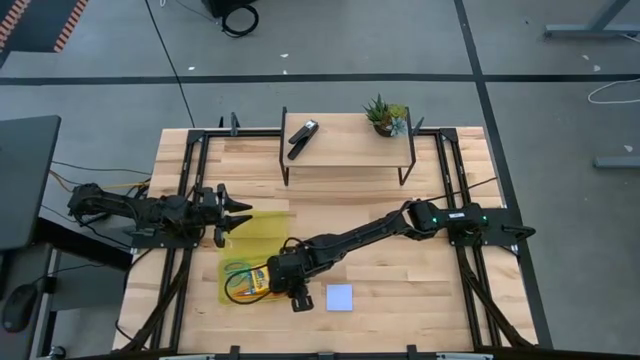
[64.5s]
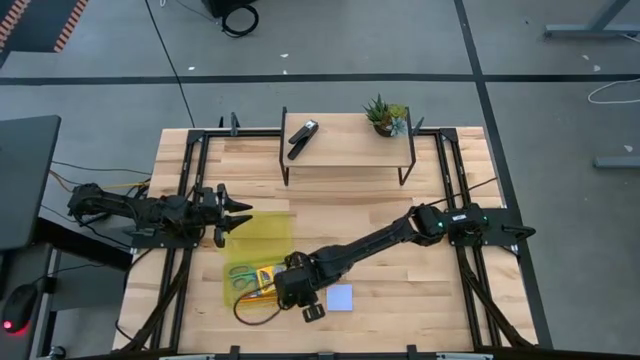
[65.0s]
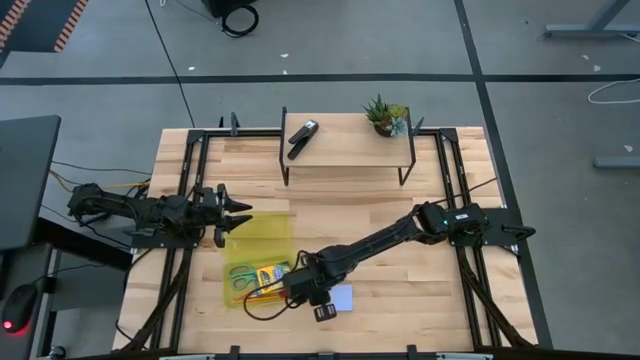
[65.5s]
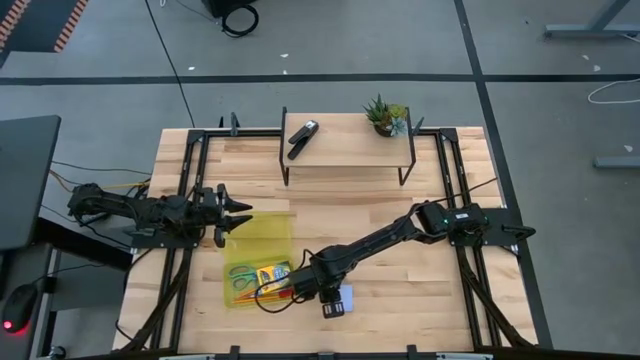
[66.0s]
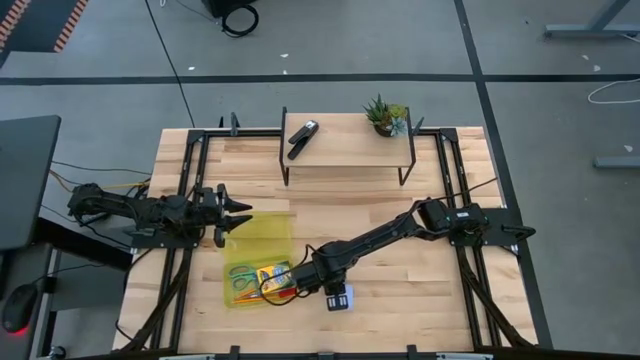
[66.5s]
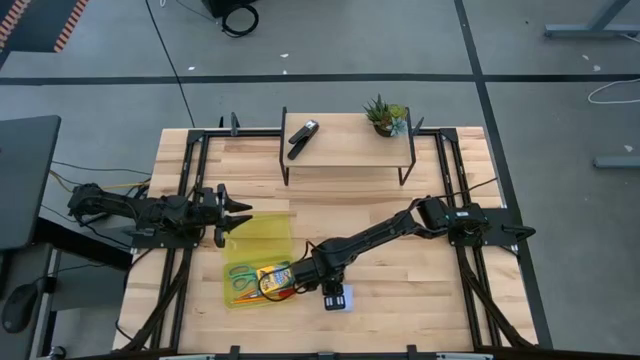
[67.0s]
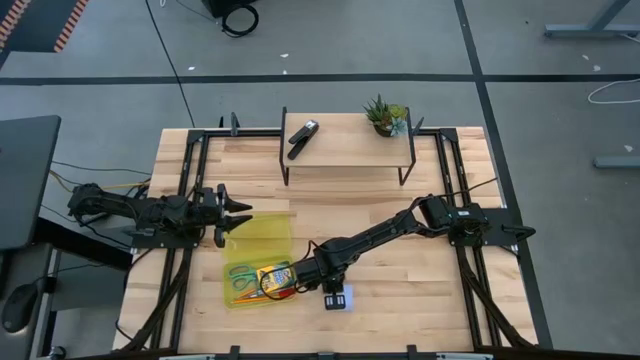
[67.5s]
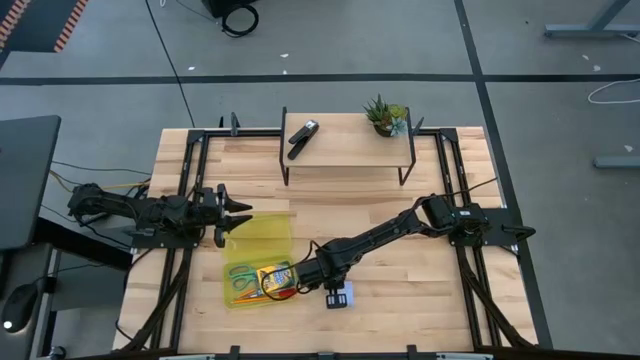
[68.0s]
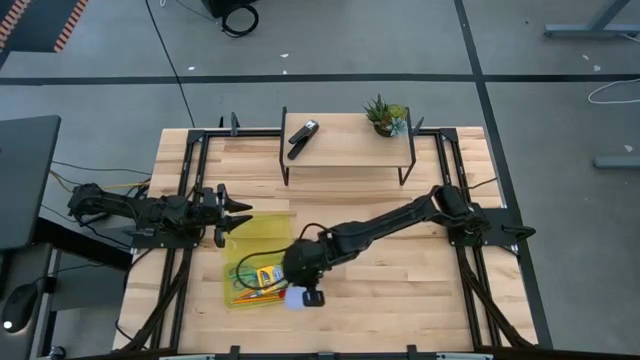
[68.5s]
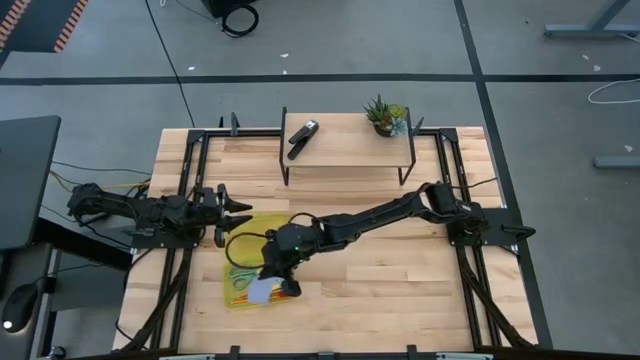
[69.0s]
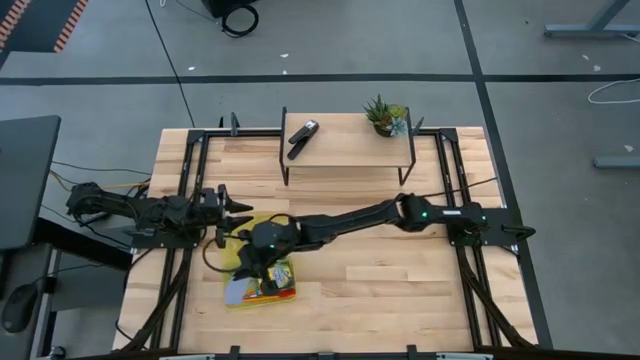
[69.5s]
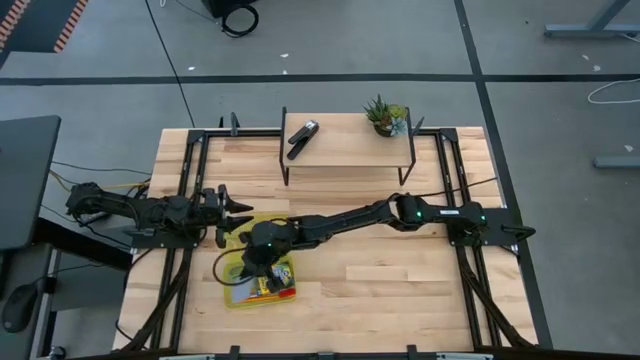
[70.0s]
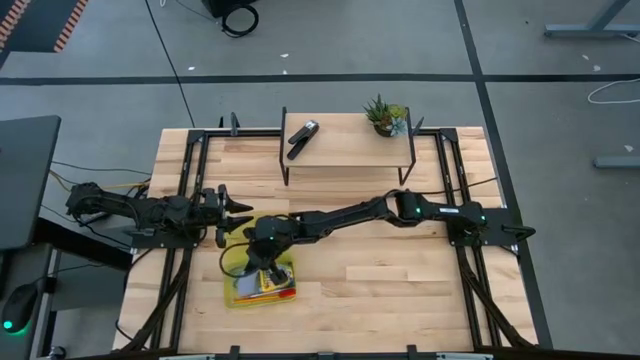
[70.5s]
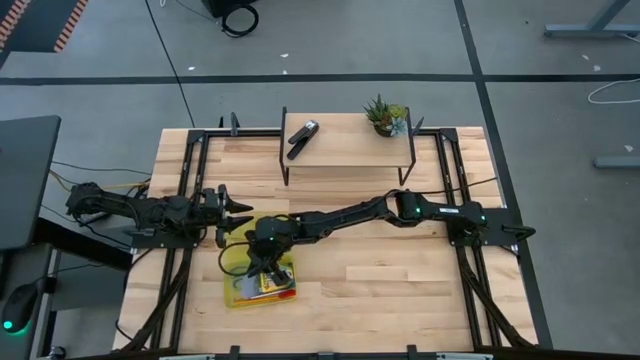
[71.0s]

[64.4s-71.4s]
Task: Pack school essentials
Put the white sticky note into the yellow supply box

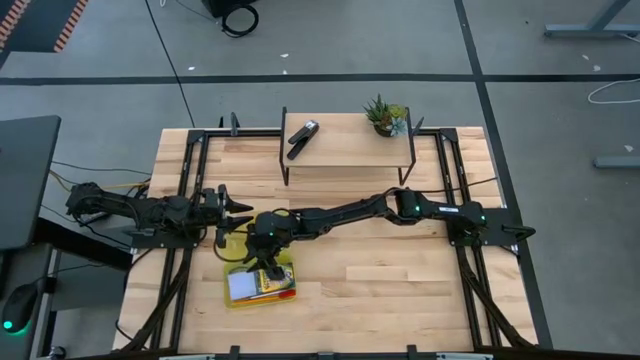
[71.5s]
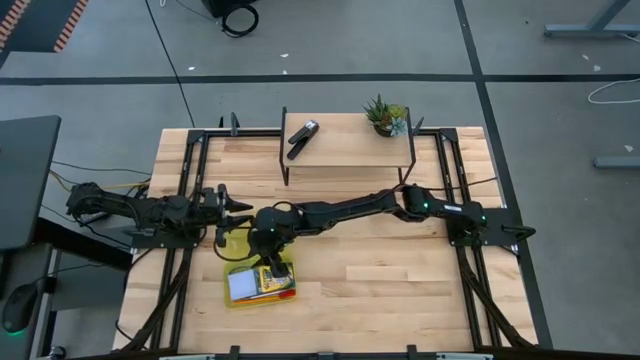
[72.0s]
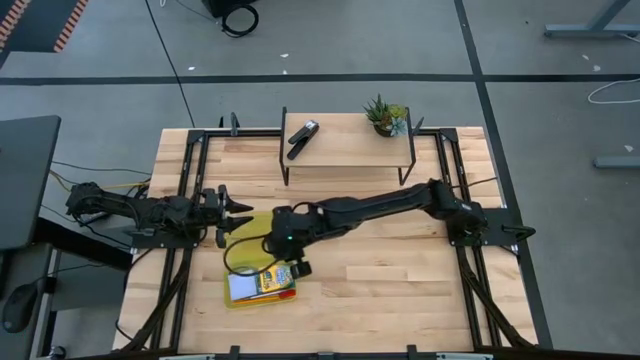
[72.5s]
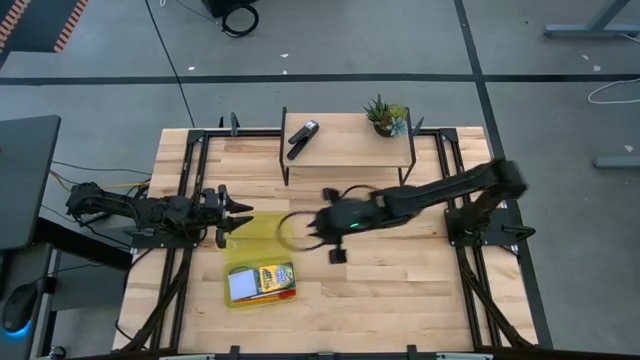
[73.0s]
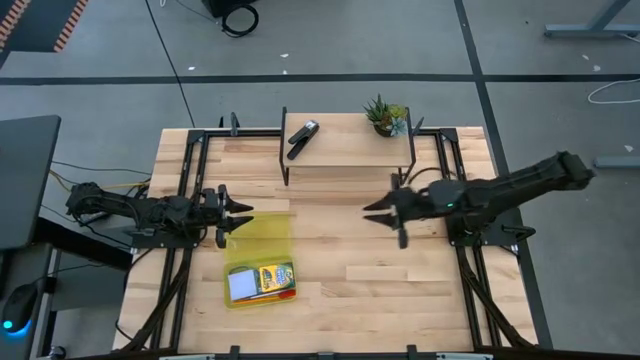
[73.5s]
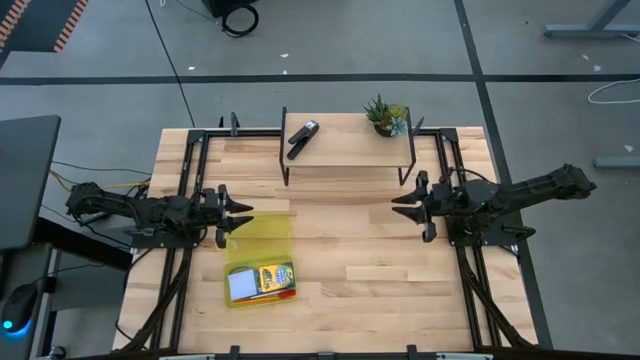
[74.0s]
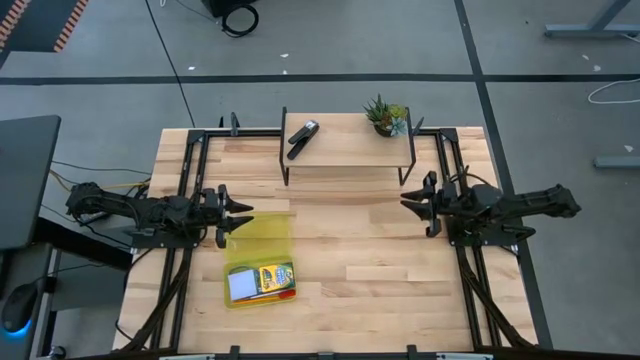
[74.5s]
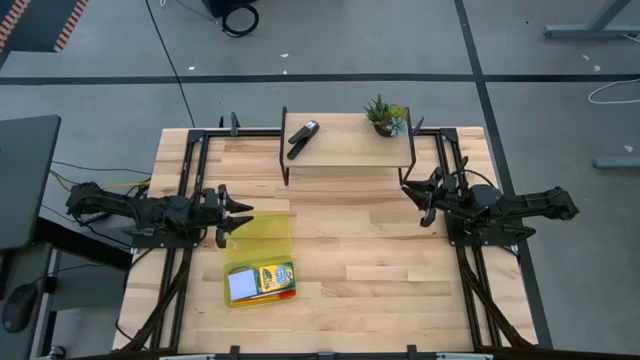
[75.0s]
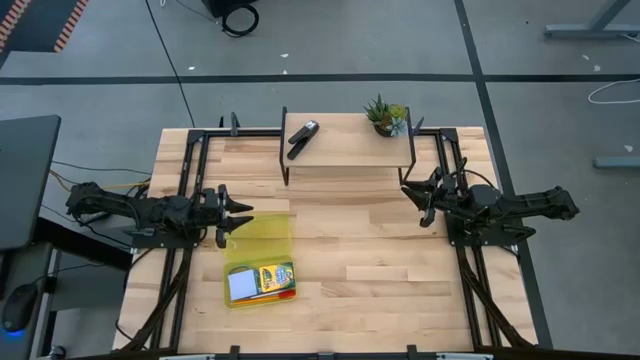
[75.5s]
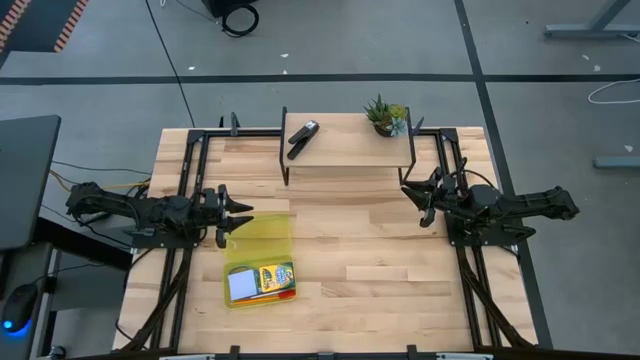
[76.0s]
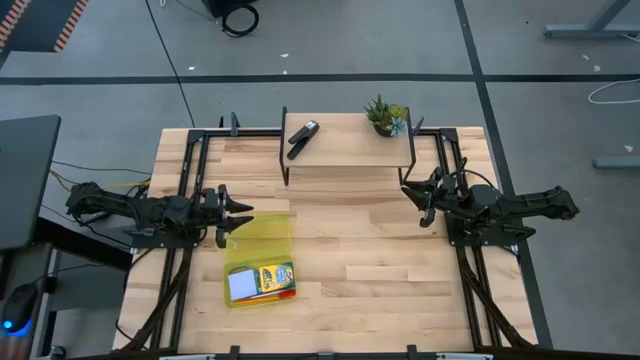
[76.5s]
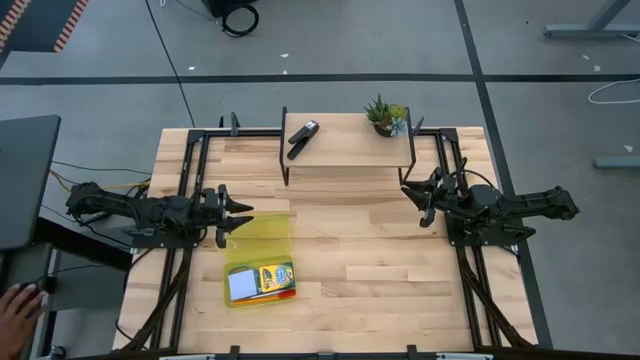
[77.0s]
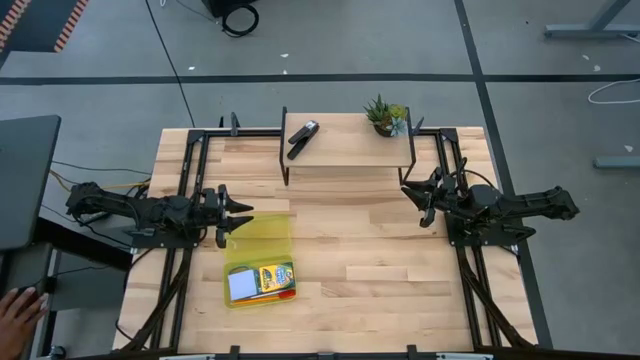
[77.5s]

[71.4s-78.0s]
Return to Home Position

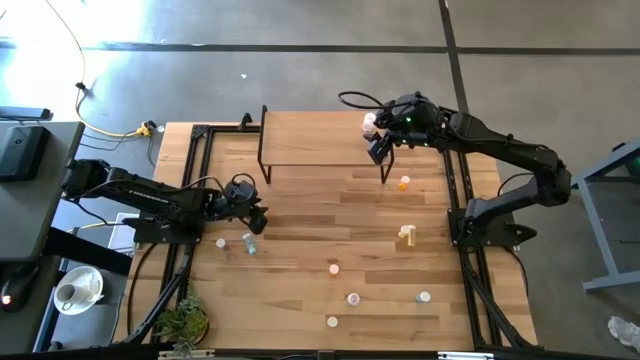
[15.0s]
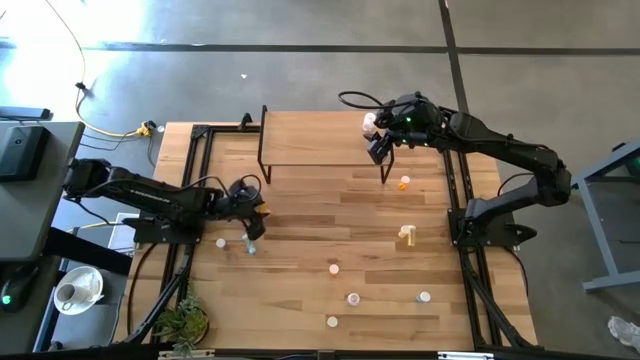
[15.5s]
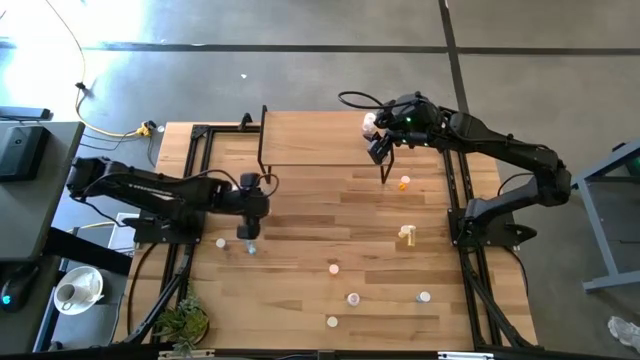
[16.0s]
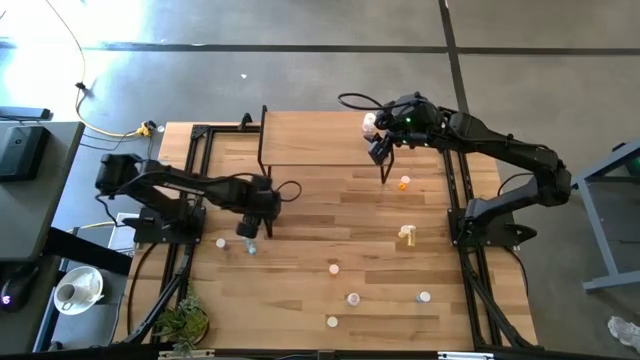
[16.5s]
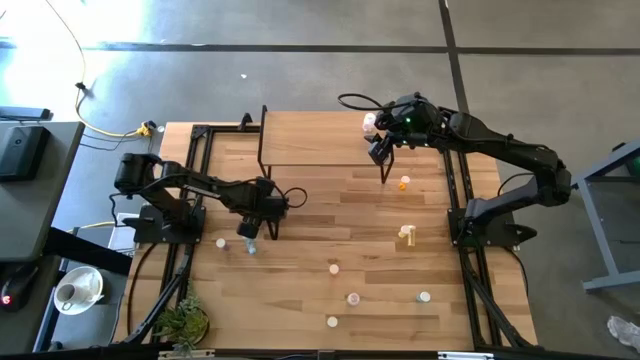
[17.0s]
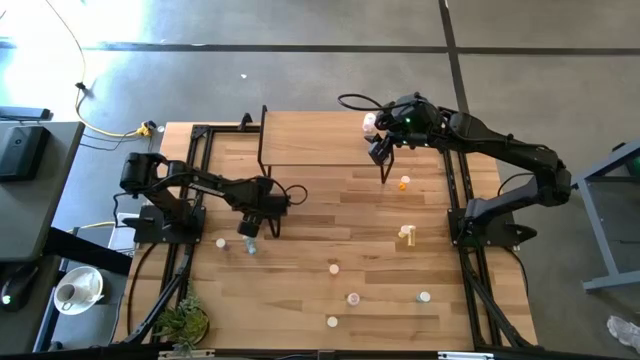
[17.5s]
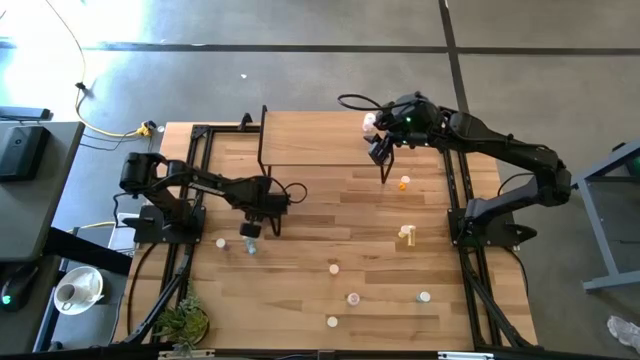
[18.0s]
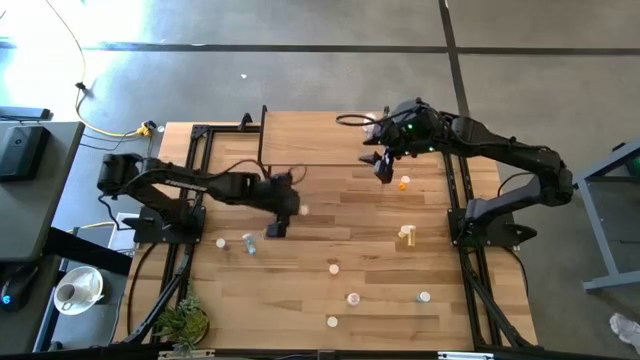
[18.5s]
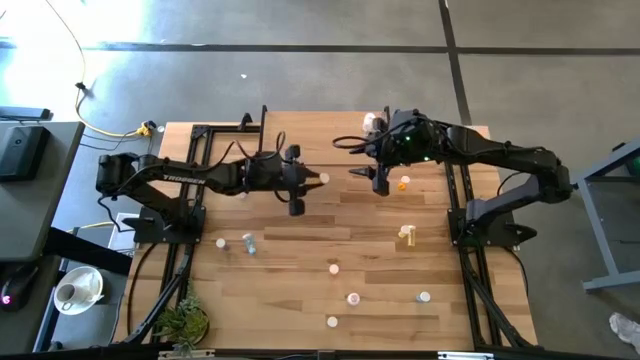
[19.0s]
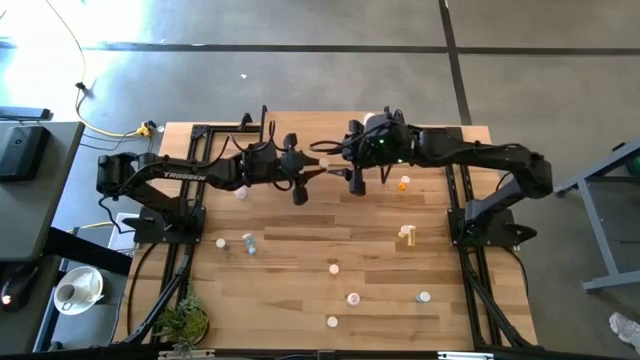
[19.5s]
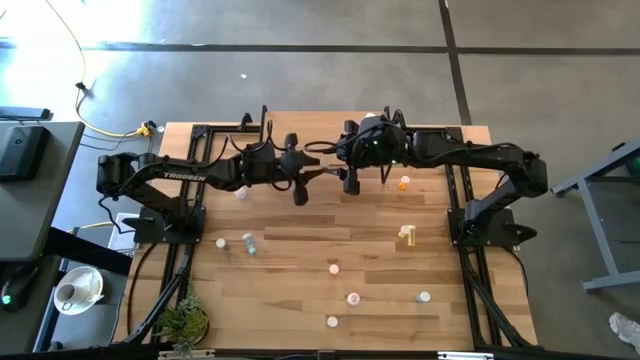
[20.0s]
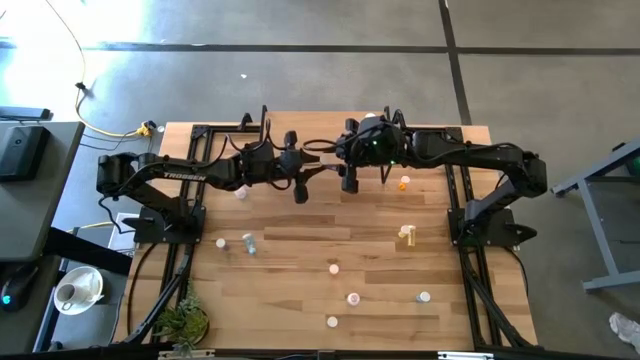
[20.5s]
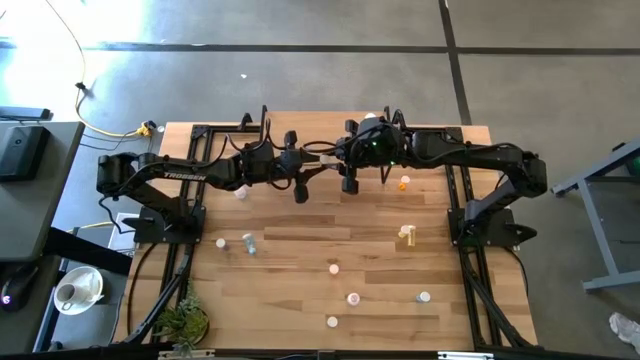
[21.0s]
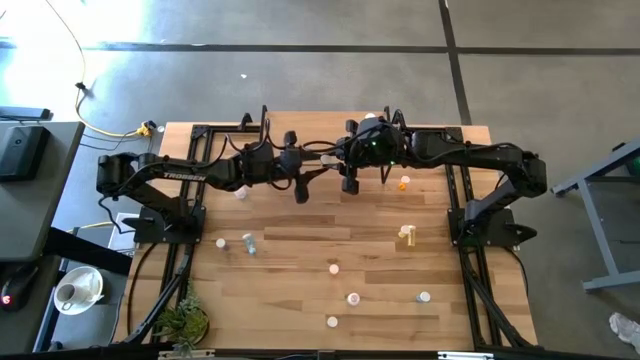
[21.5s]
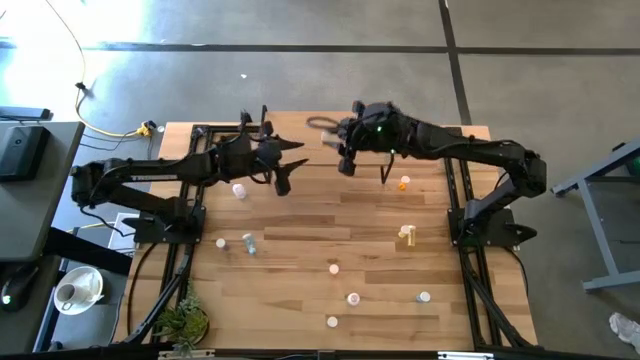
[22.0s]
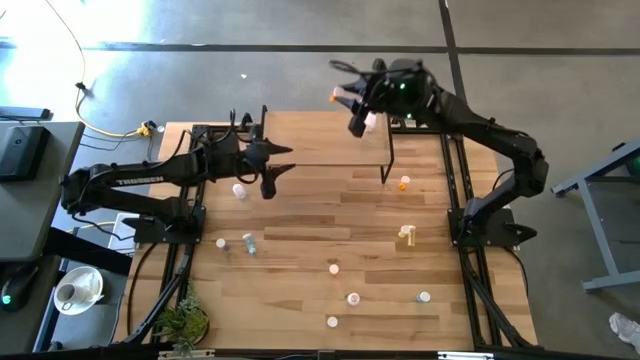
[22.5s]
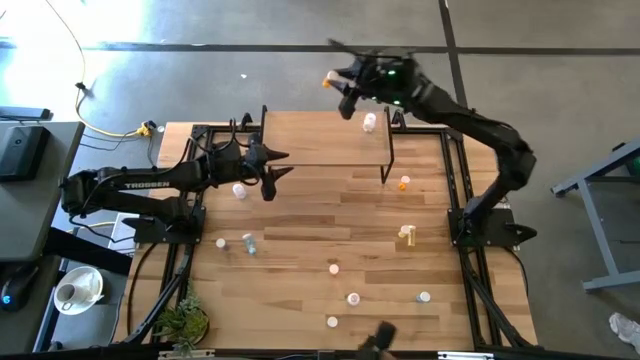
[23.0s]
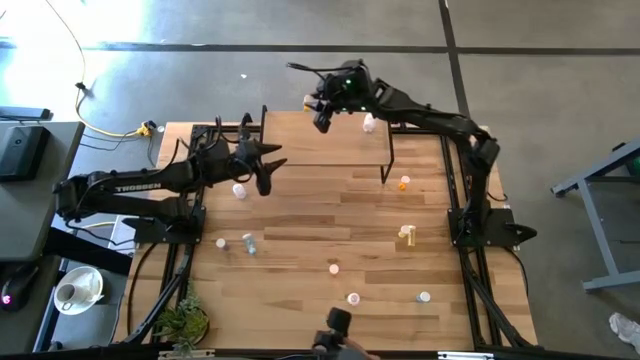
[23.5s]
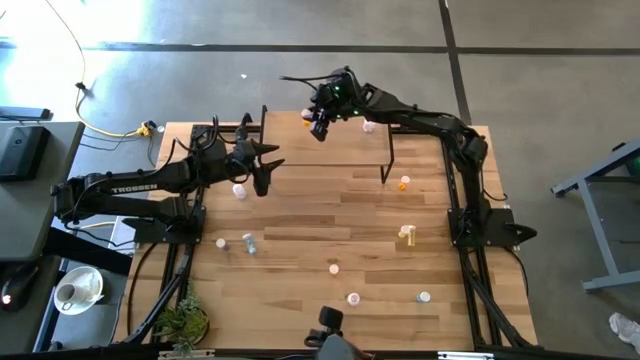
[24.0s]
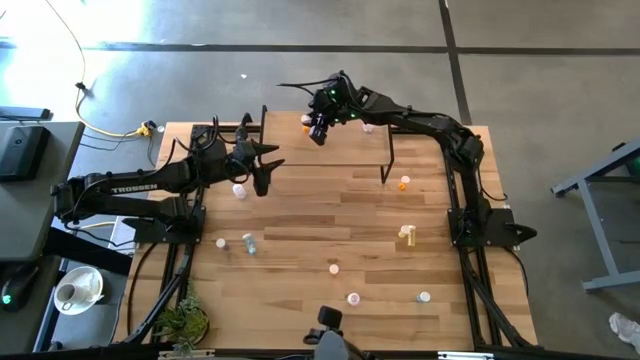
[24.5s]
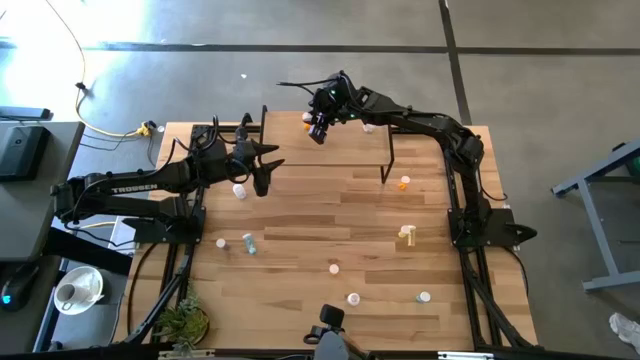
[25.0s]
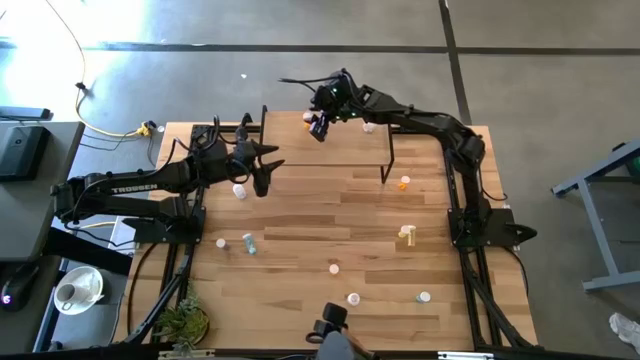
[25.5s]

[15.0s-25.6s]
Task: Pick and place medicine bottles onto shelf by color
Put the middle left orange pill bottle on the shelf
